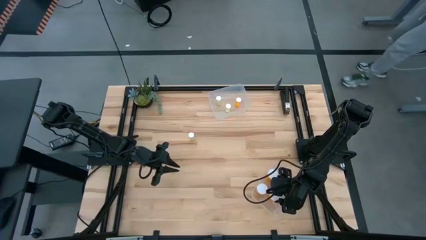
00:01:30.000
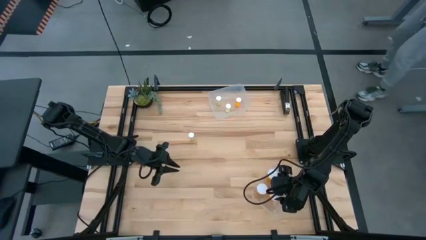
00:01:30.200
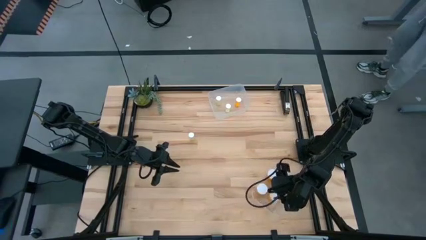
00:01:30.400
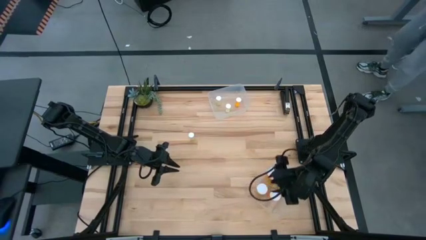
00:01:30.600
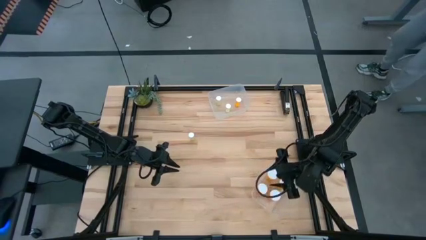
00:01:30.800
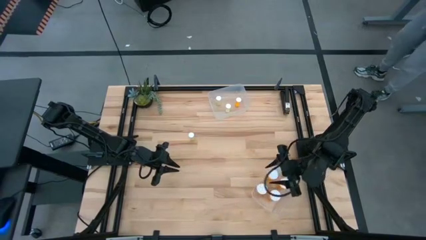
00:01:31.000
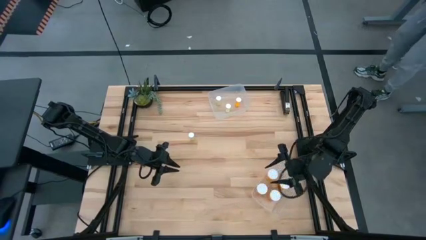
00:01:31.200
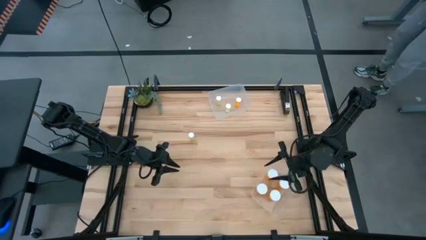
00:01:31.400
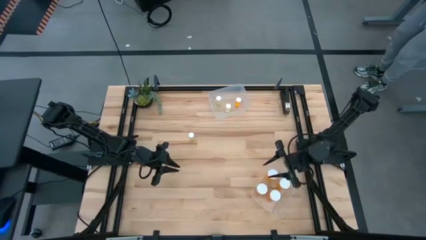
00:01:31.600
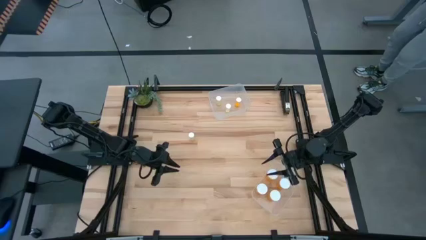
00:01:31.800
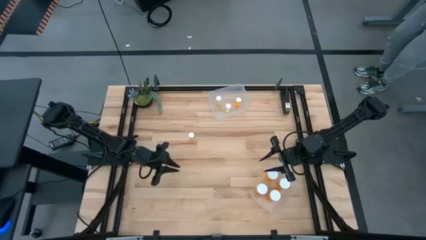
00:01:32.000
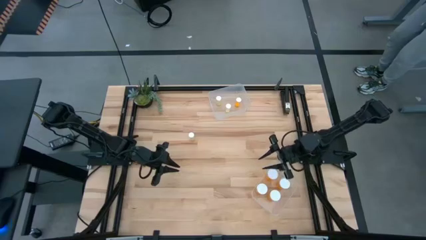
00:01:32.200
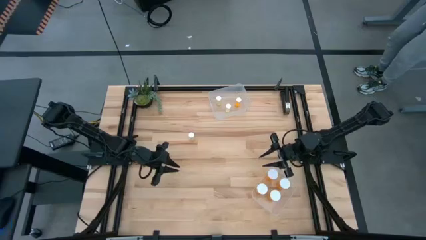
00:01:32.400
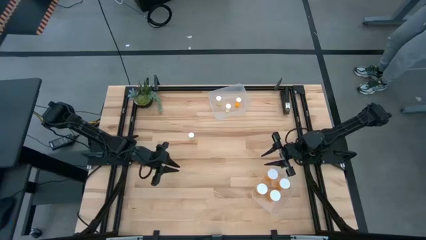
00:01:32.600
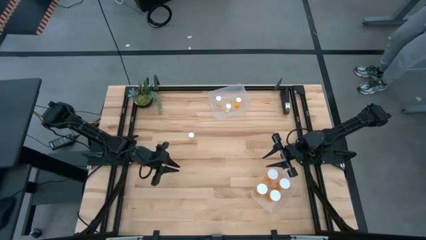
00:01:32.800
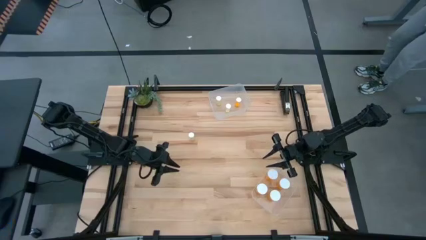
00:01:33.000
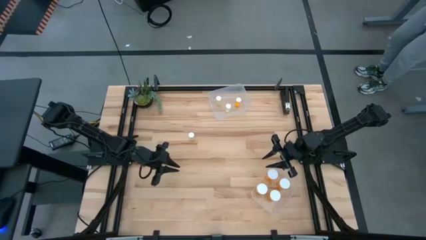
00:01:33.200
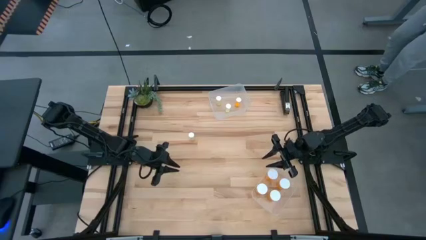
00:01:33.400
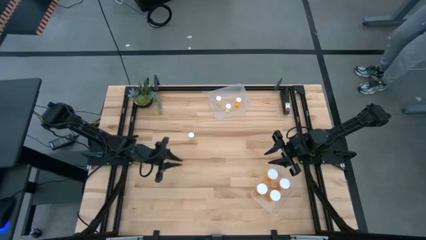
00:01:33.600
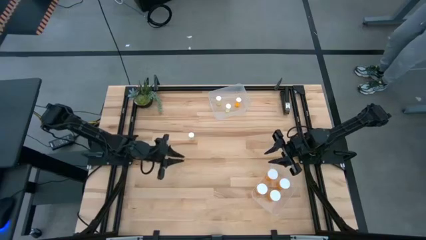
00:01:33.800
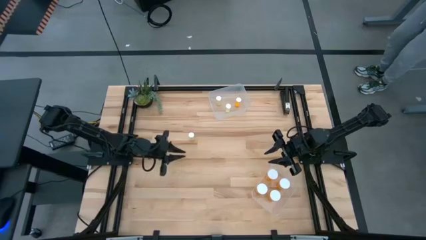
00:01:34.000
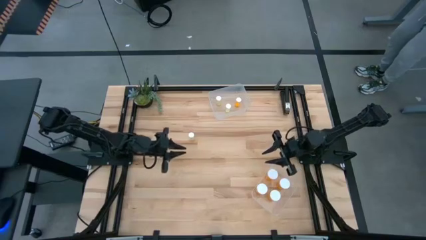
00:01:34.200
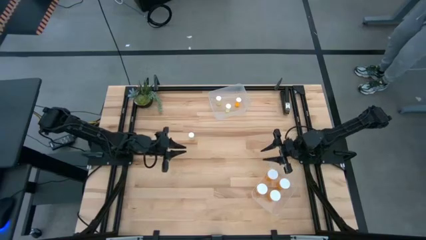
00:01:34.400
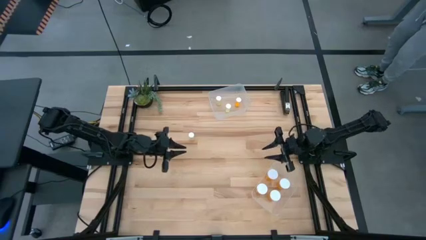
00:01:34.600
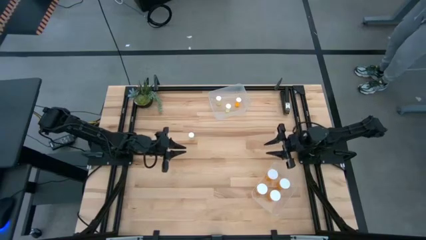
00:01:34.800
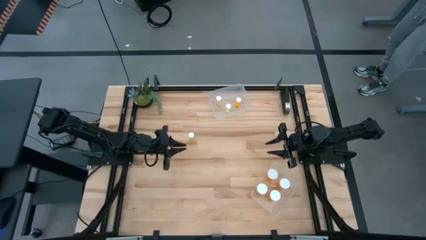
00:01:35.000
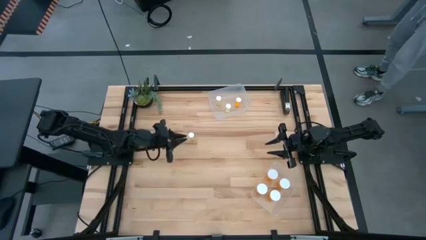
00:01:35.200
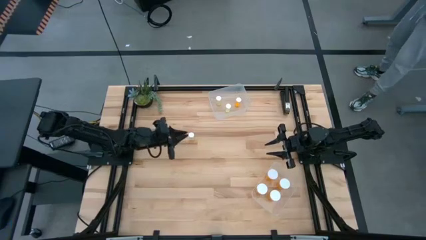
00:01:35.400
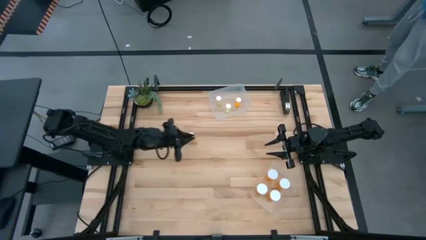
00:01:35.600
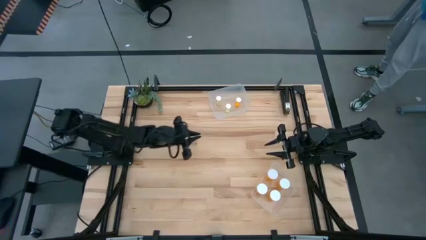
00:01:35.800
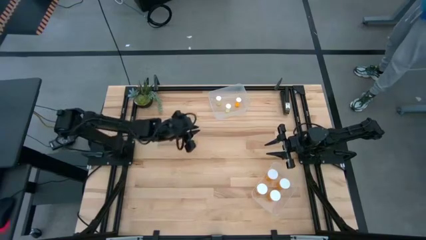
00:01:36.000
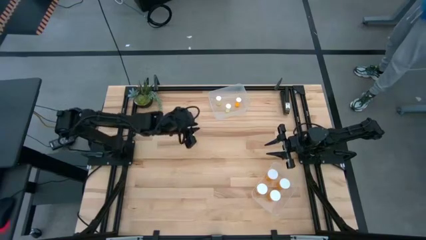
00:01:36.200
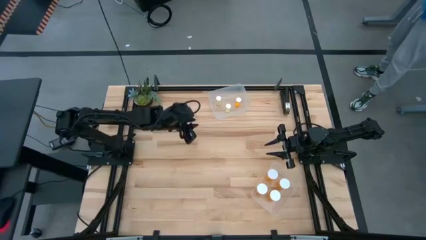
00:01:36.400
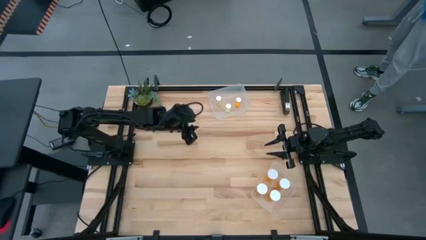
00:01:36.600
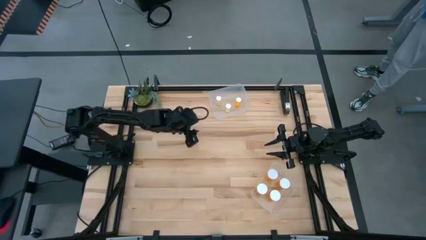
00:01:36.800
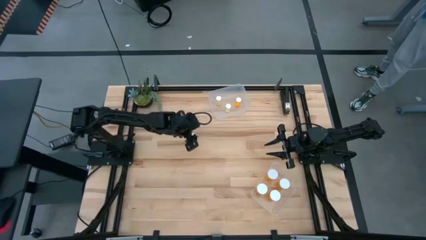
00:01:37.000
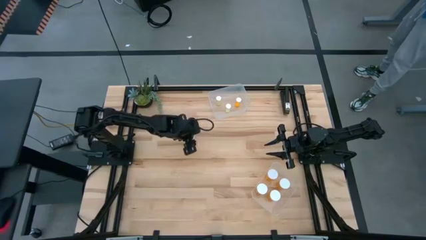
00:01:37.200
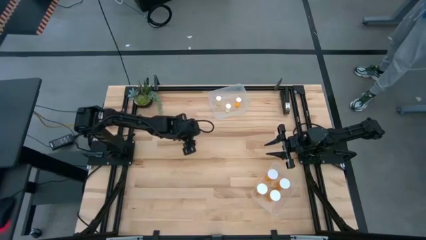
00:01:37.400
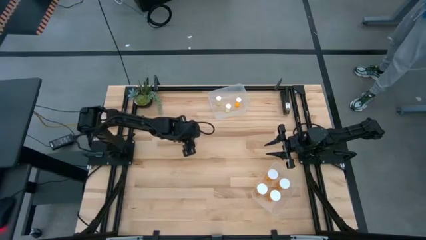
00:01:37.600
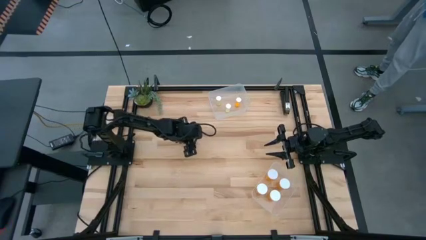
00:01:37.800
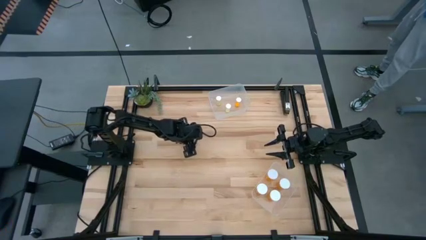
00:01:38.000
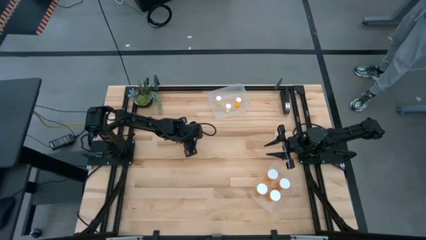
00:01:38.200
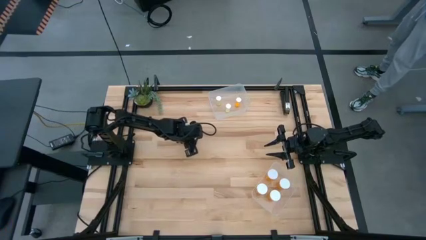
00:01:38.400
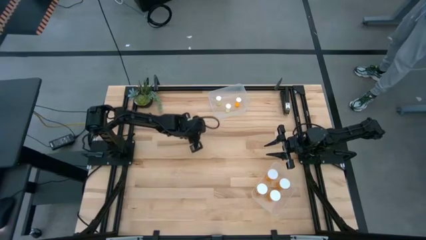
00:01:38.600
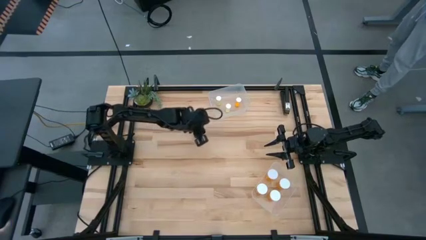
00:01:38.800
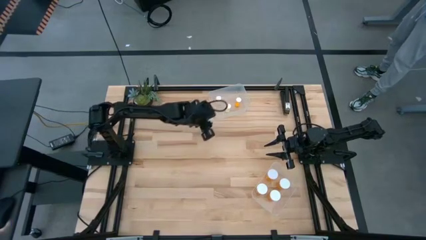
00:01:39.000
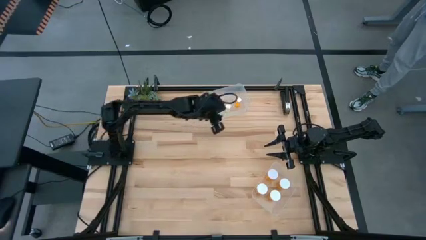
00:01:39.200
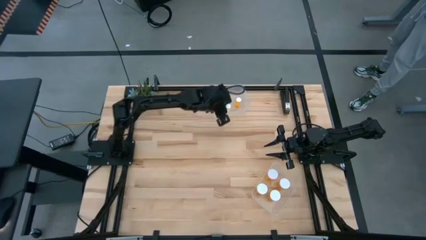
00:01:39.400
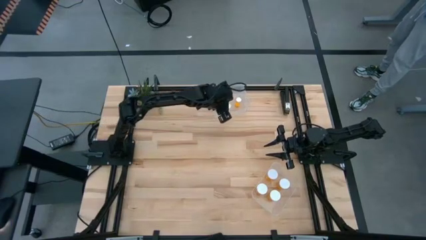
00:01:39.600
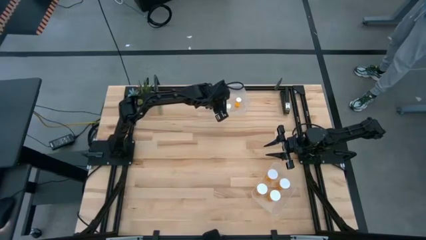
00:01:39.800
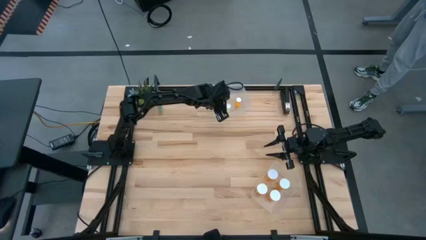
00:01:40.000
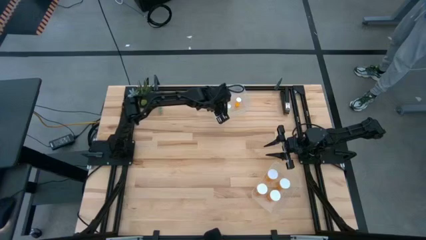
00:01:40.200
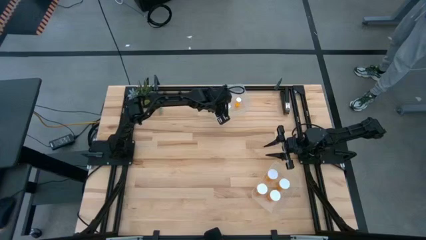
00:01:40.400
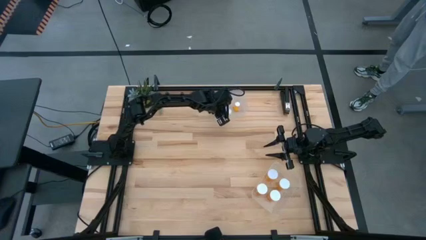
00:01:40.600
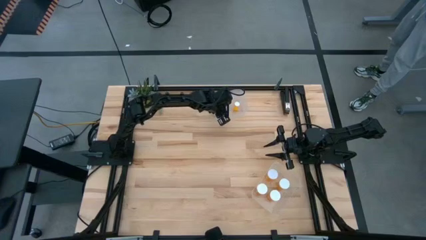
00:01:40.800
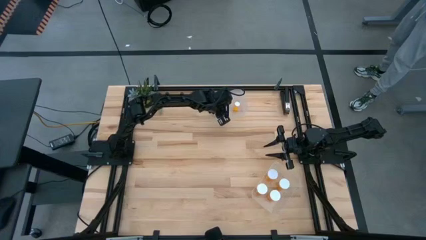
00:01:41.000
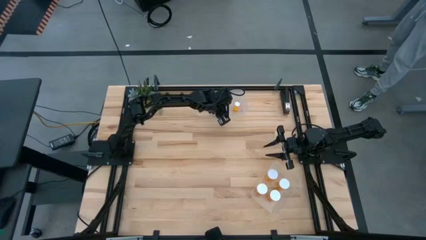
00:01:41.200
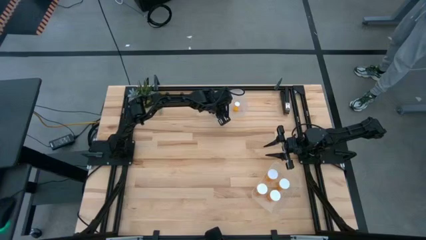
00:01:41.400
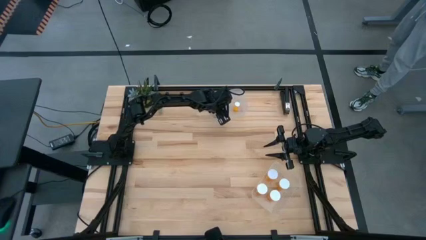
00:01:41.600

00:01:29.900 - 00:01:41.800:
Task: Pick and place medicine bottles into bin by pill shape (circle, oval)
Put the yellow pill bottle into the top transparent bin

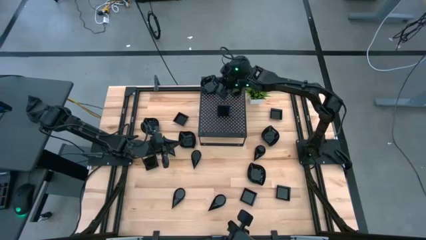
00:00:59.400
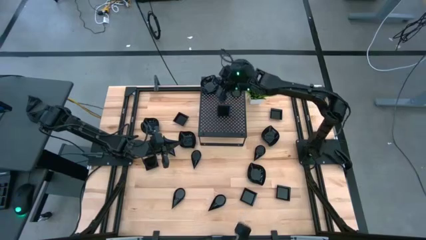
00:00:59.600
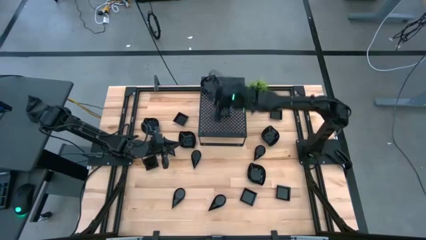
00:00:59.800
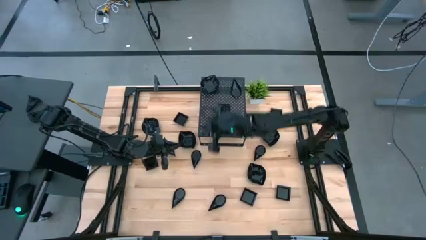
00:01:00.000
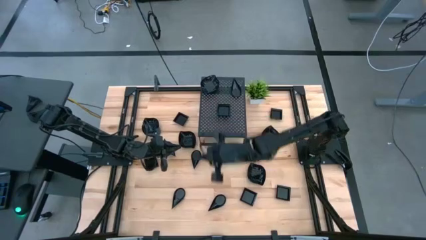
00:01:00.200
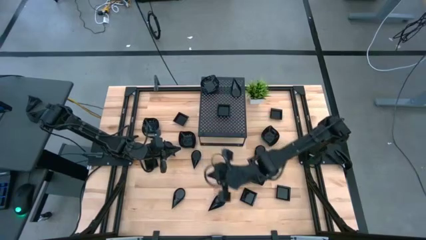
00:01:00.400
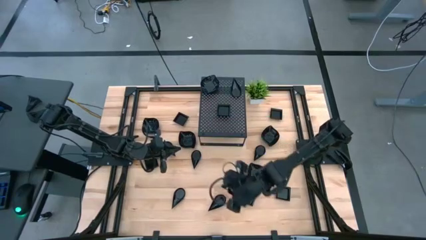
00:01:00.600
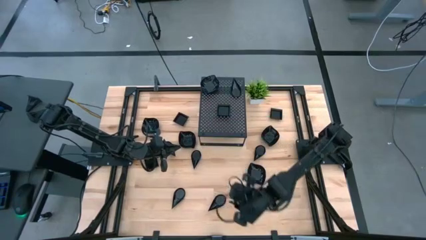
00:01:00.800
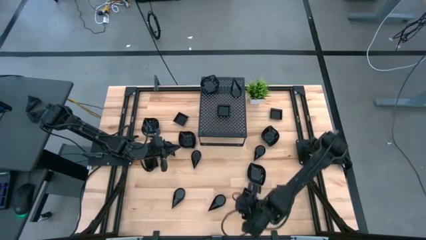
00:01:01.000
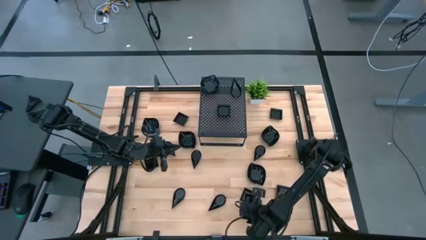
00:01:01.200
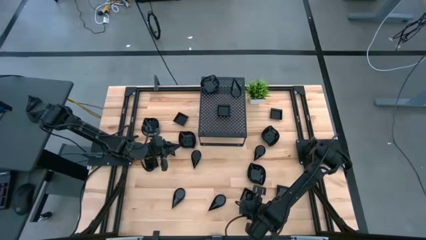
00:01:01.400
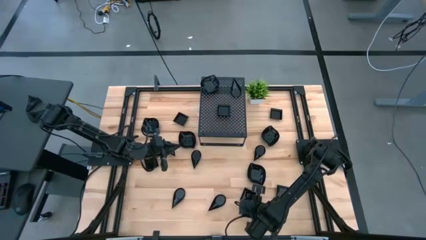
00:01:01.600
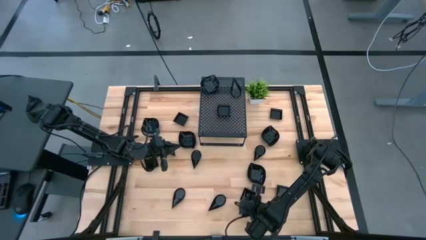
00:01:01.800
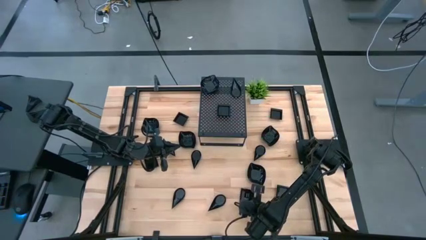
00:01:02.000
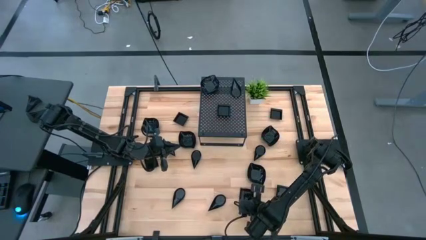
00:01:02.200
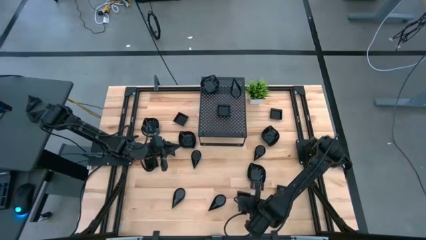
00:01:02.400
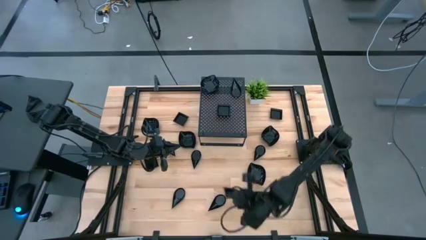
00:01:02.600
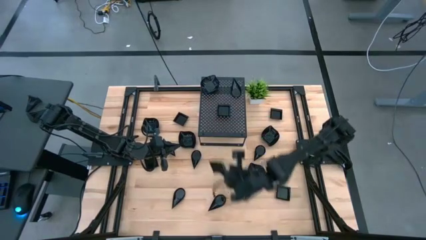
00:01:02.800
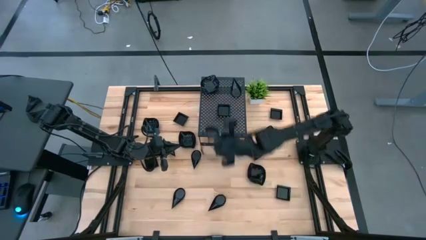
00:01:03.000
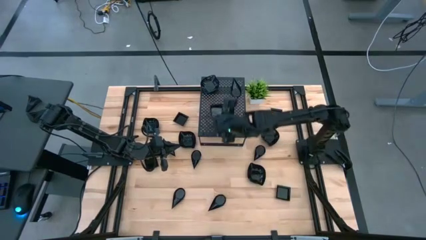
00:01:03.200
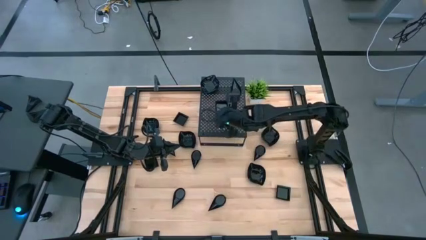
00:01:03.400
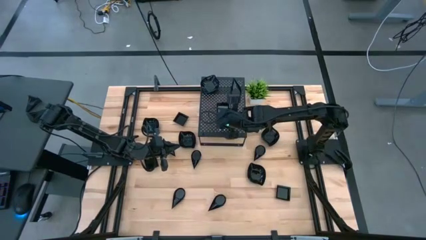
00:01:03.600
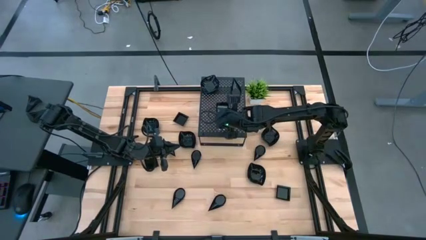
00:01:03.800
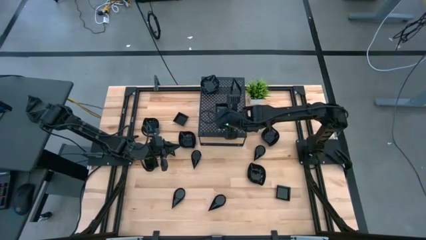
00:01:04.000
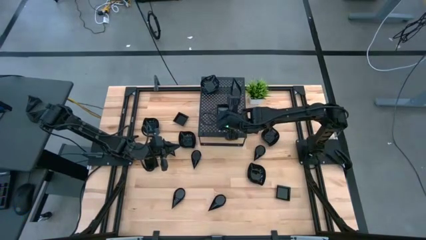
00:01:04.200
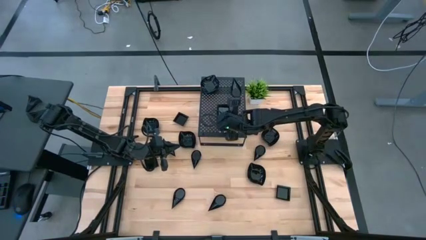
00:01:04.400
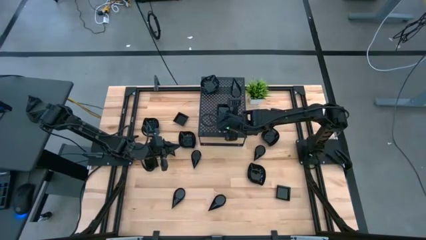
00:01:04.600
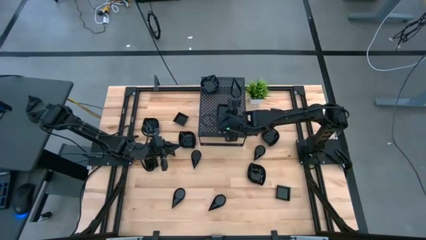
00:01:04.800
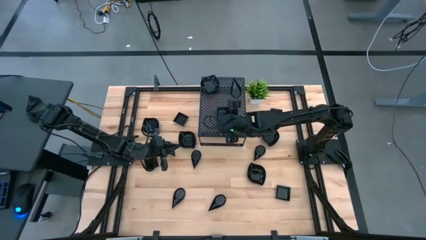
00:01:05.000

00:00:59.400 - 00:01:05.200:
Task: Pick & Place Mini shaped plates
Stack the black square-shaped plate on top of the black square-shaped plates on the shelf
